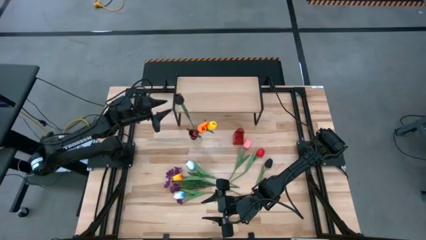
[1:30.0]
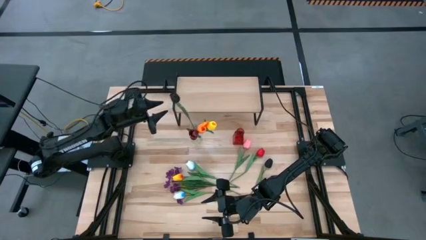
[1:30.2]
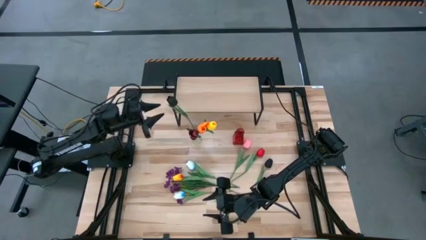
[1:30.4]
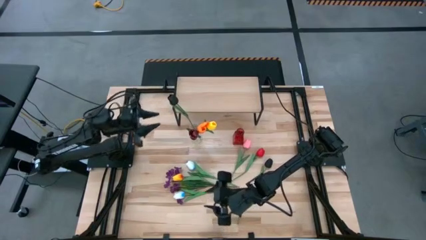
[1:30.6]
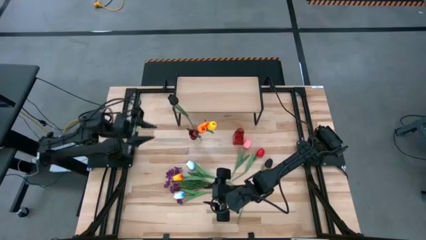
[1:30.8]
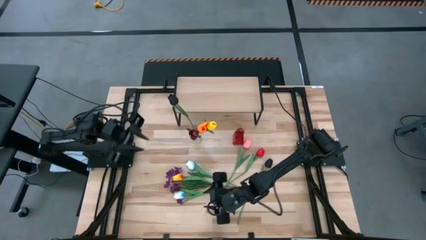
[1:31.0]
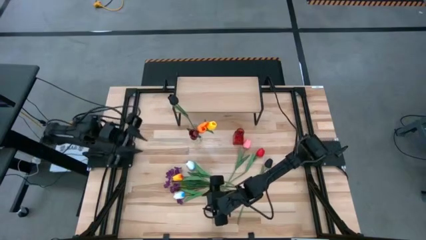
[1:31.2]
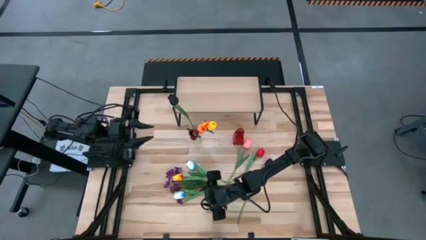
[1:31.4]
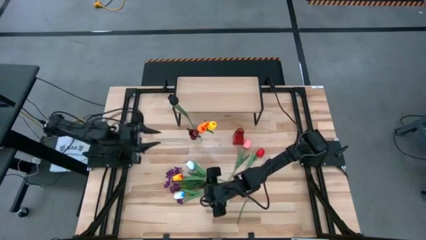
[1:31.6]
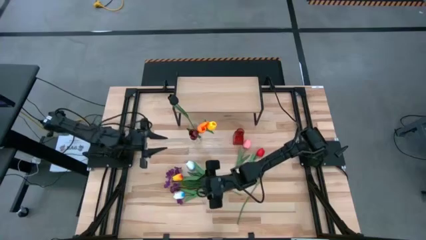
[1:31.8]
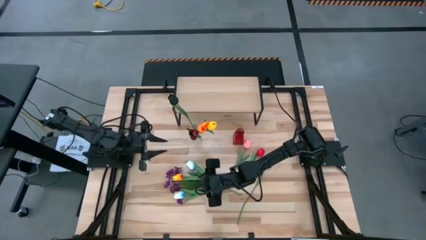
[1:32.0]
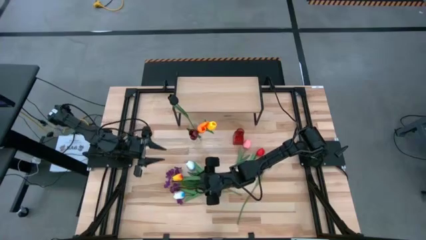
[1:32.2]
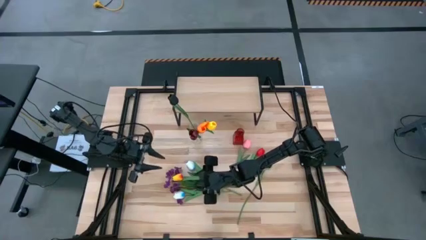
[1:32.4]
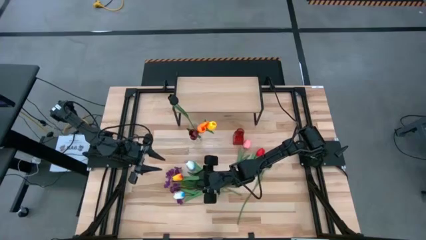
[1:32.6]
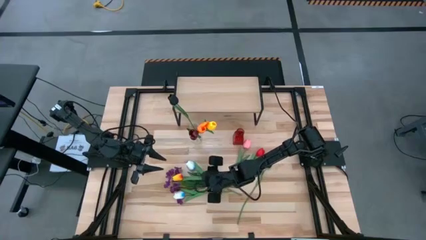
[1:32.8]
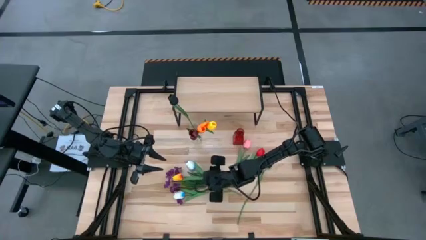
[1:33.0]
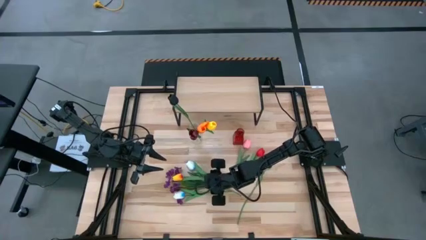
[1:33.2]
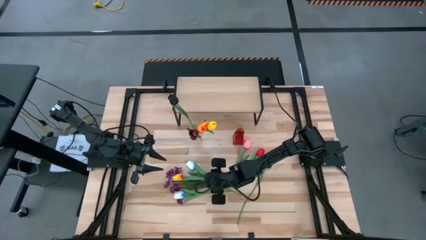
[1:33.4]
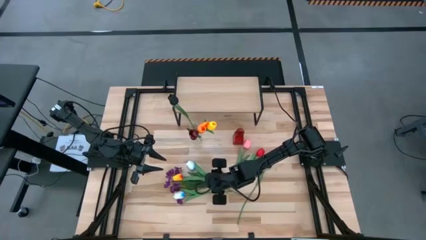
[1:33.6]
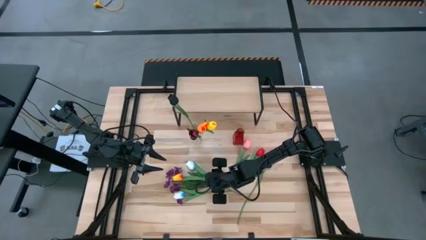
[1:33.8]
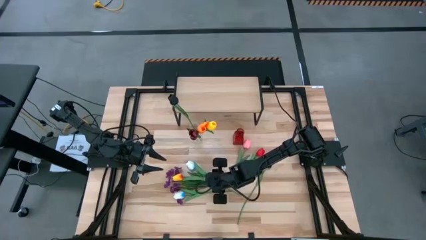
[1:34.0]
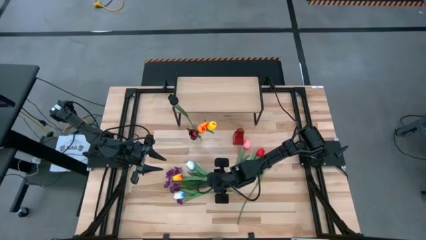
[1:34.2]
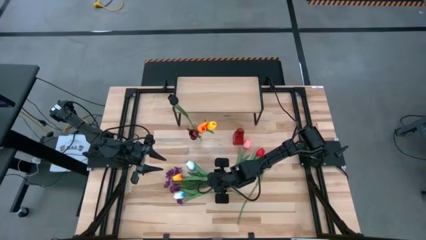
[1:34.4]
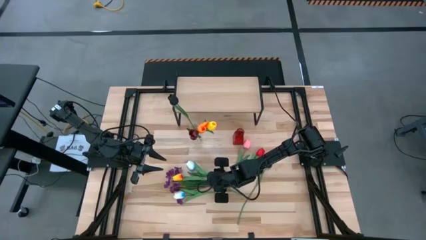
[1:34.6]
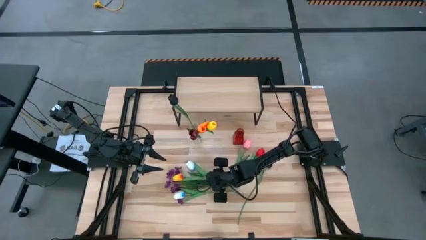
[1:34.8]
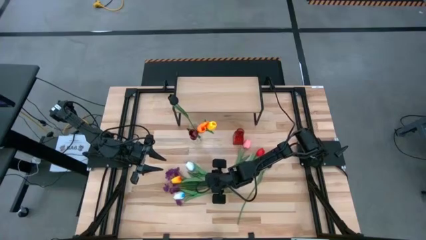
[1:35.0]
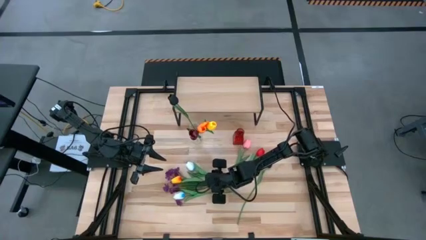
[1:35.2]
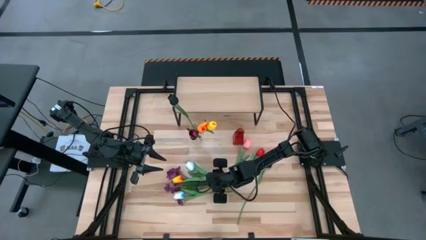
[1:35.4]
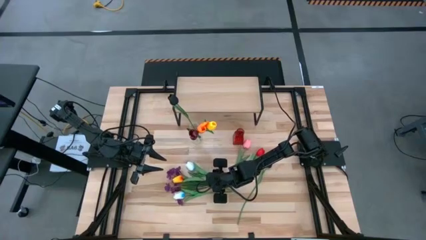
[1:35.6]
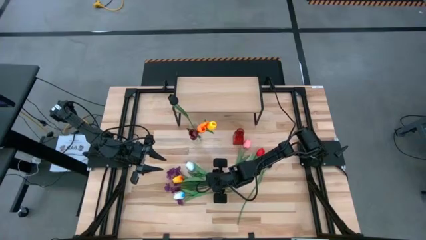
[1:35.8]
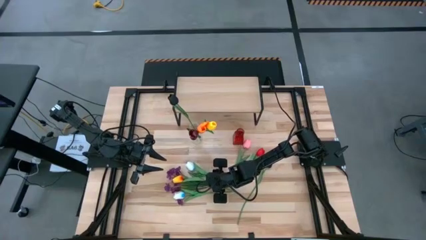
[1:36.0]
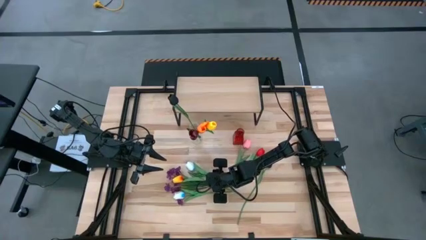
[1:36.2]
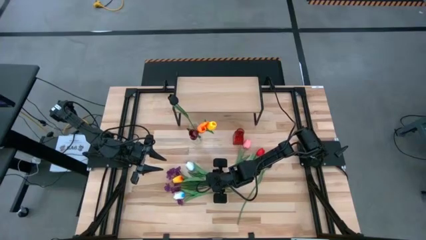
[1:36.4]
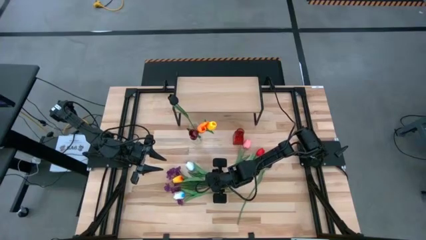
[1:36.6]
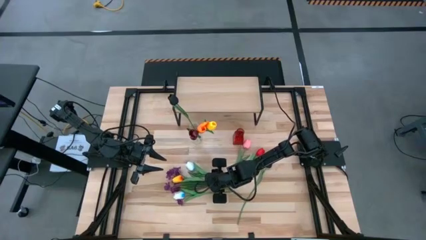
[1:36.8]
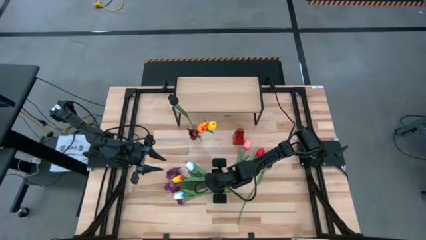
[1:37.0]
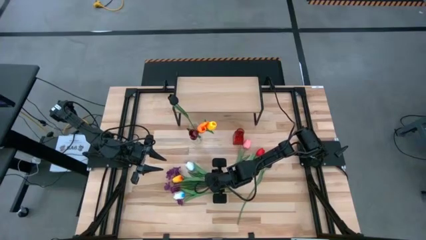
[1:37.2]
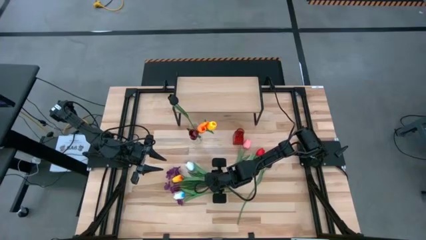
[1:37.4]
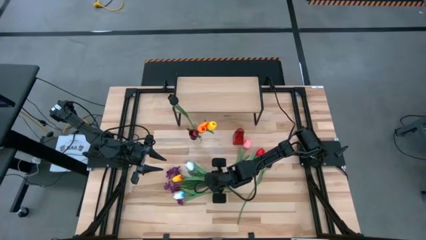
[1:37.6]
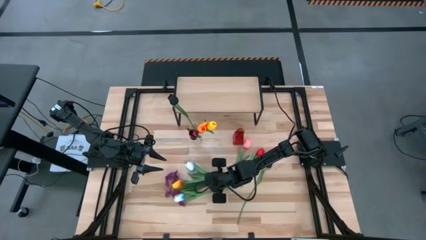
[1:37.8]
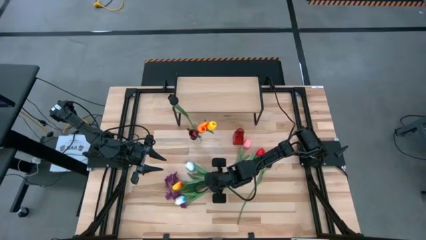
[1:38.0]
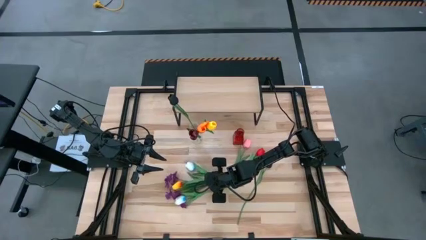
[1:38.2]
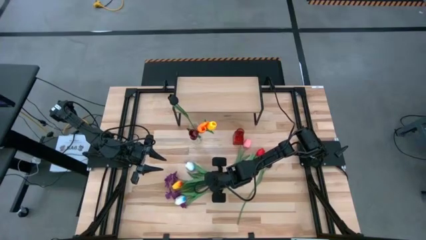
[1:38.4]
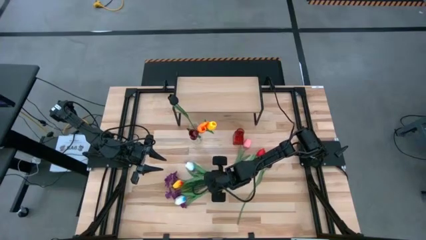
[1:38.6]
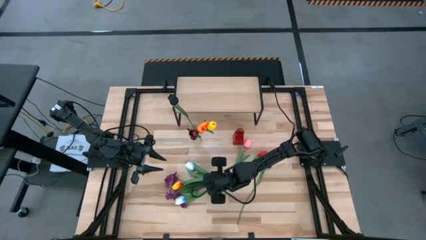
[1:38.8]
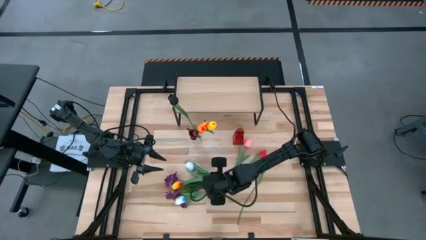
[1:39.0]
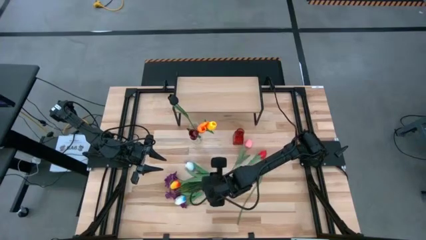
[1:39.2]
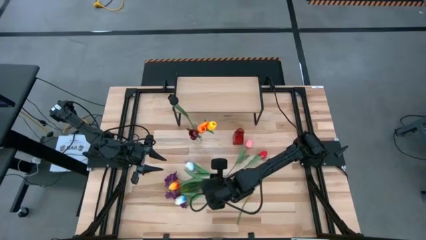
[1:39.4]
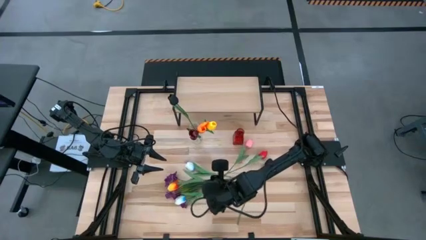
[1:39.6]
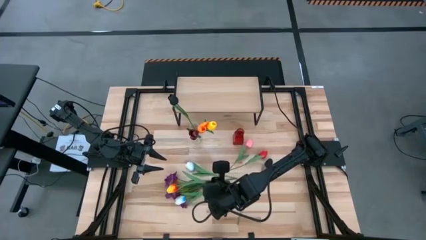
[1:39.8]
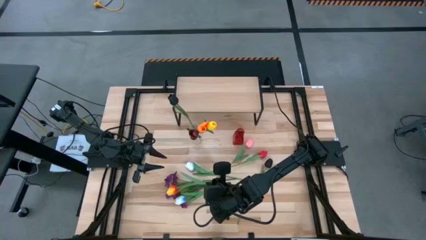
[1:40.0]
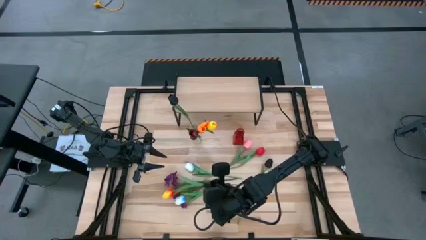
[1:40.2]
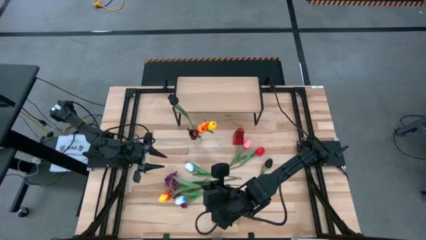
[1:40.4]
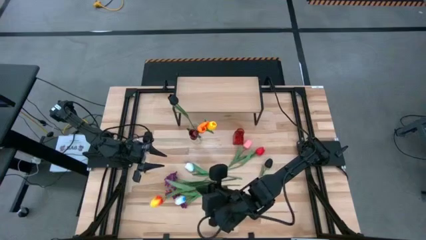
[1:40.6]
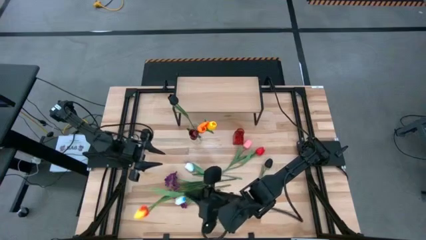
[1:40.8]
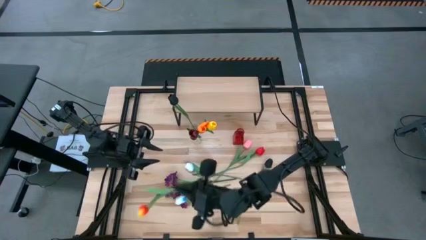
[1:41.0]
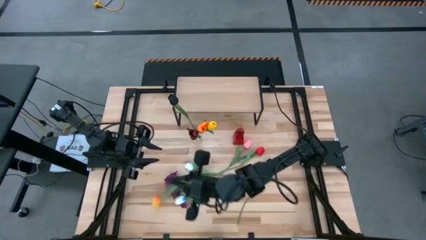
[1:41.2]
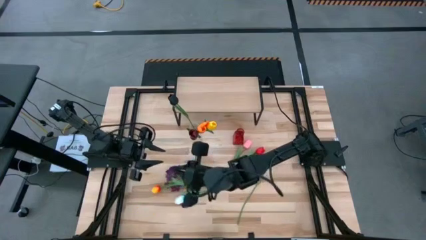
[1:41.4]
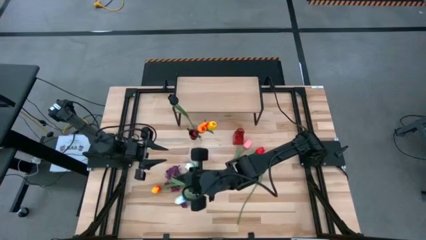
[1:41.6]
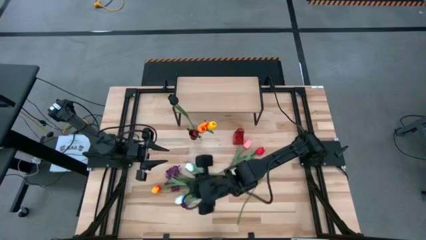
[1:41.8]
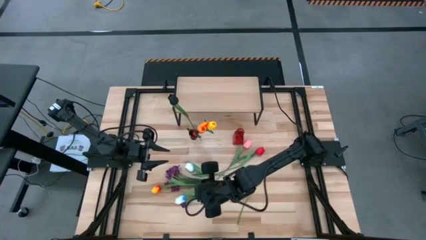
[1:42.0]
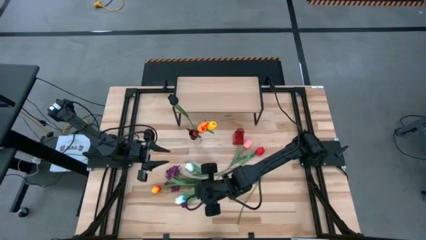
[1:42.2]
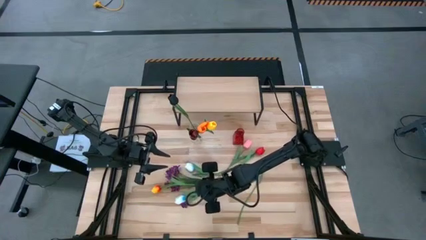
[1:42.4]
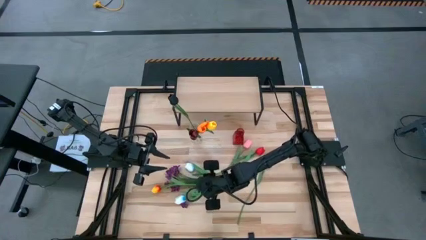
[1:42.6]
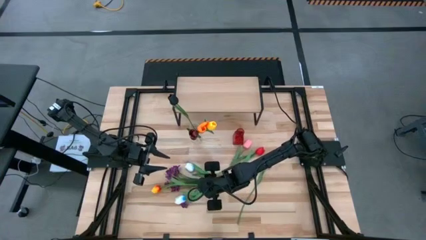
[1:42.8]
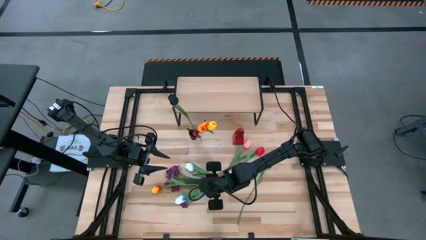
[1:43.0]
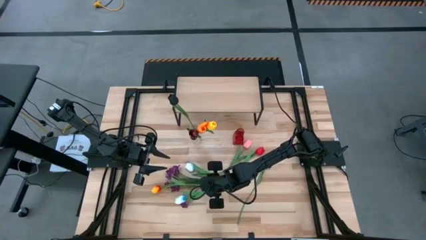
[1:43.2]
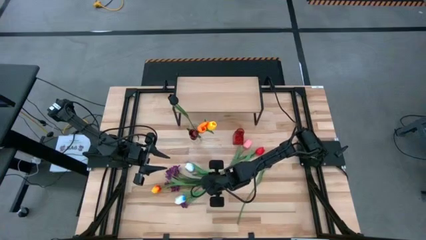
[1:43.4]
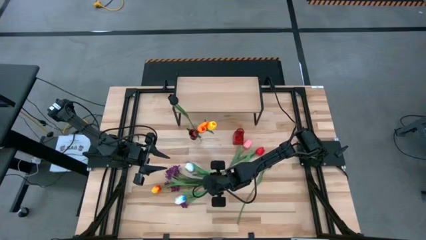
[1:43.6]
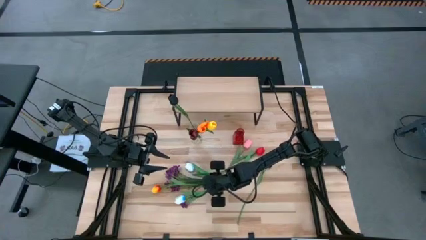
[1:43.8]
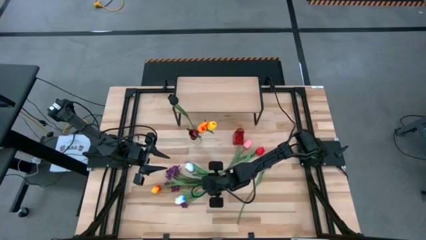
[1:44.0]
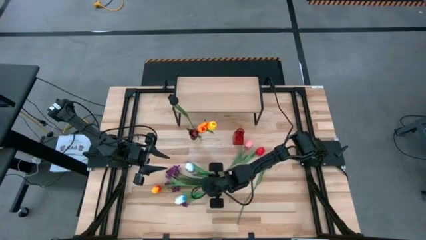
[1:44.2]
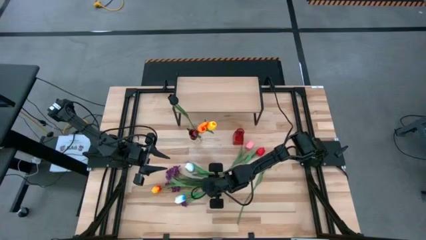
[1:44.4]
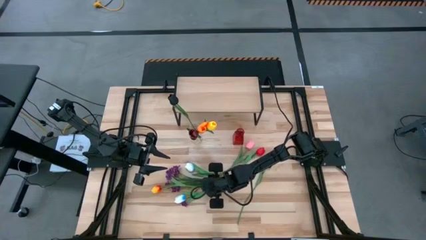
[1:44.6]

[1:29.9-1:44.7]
Task: Pick and place flowers into a vace then onto a shelf
Put the yellow tulip into the transparent vase

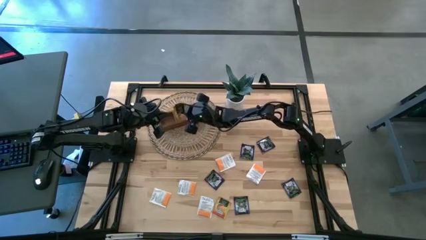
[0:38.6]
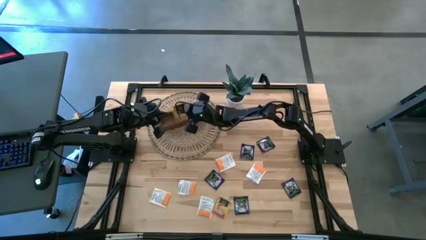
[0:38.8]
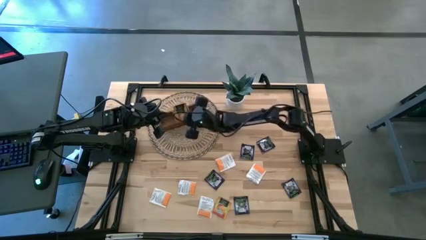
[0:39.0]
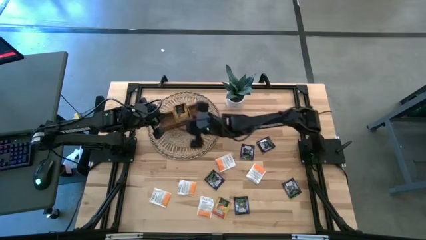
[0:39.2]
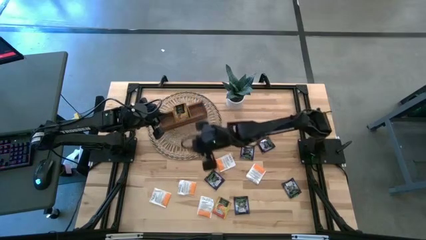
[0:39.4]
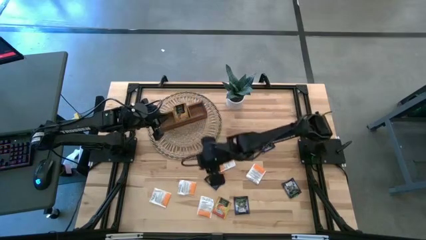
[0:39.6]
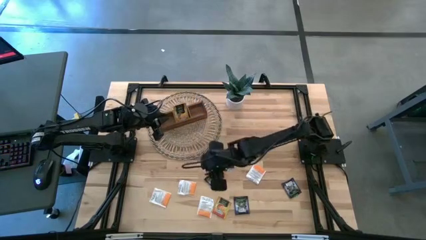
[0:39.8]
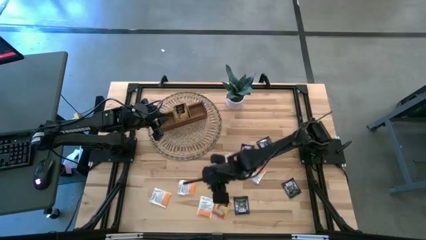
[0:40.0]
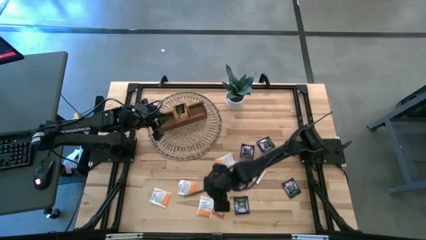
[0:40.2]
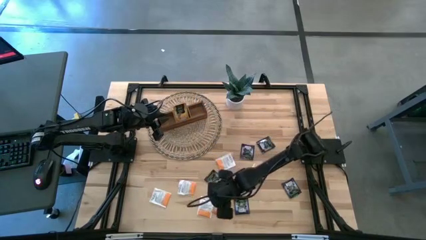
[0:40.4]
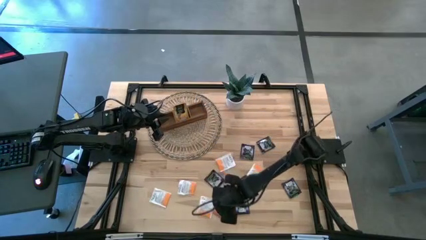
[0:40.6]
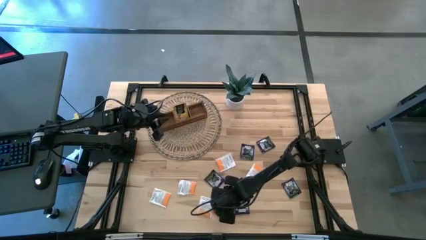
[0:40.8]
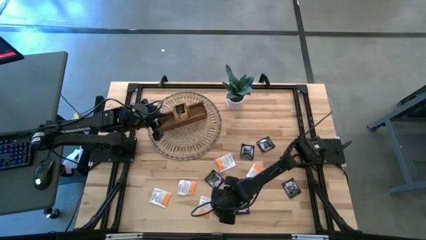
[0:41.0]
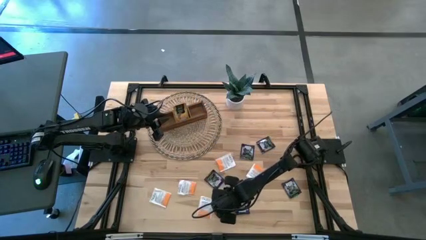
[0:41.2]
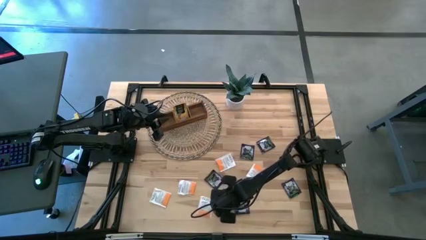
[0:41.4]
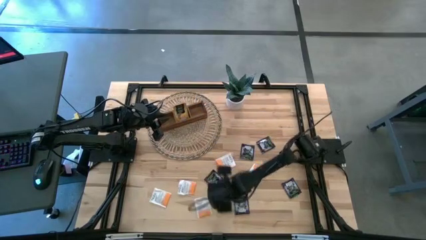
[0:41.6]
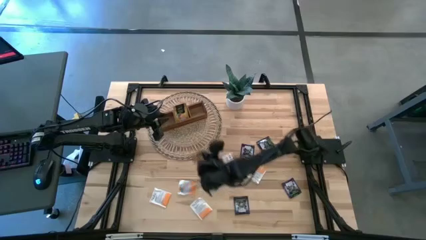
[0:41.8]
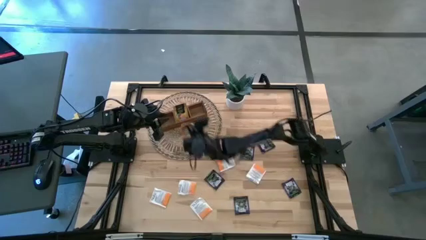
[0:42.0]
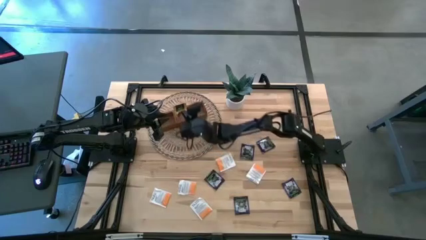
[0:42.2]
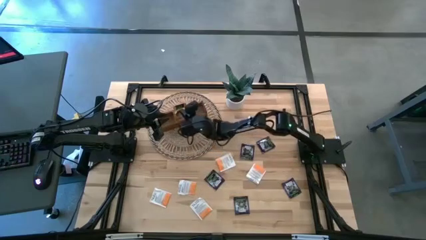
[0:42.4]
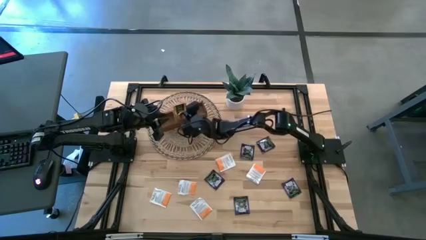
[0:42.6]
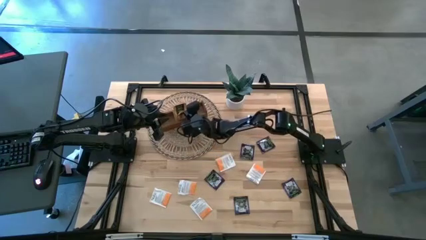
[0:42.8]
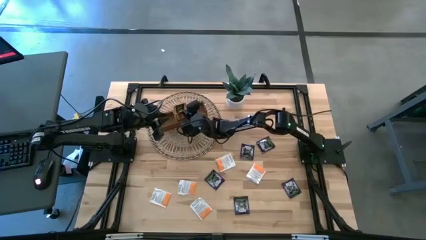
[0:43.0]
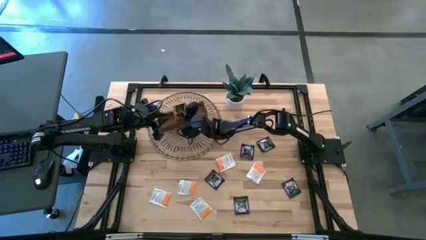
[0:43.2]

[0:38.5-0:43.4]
Task: Pick & Place Tea
Put the yellow tea bag into the middle section of the wooden organizer
